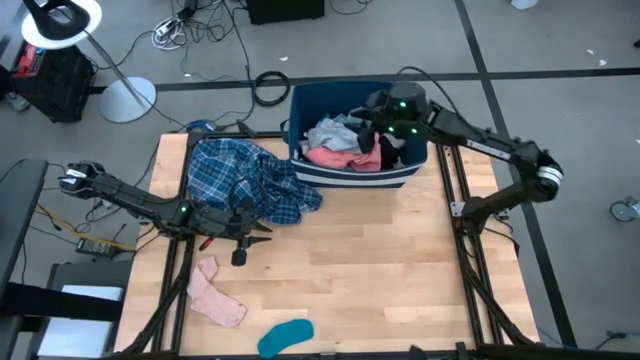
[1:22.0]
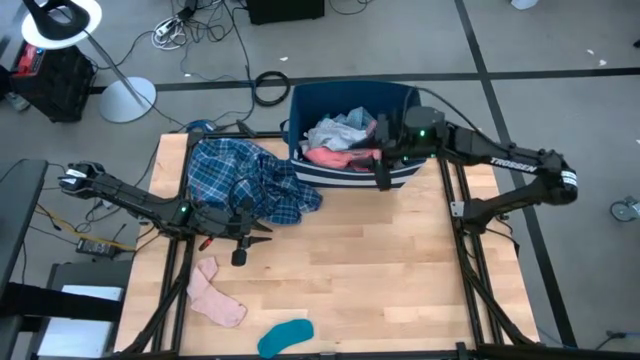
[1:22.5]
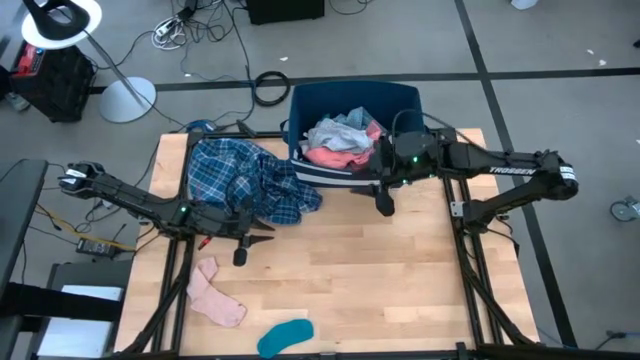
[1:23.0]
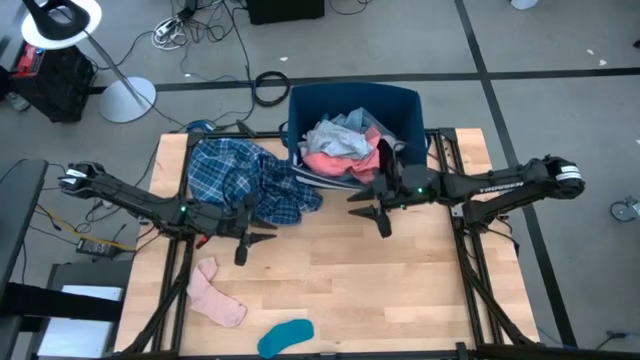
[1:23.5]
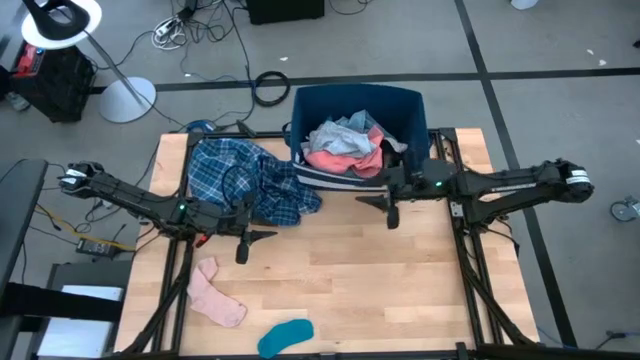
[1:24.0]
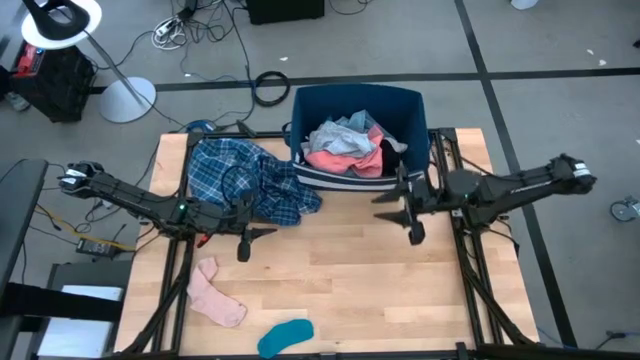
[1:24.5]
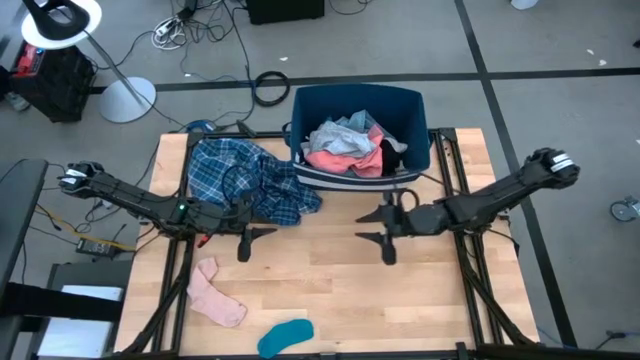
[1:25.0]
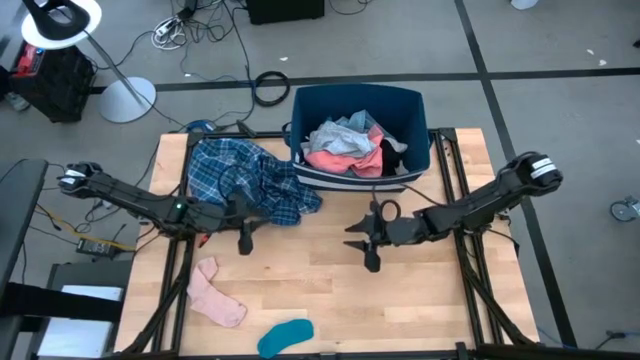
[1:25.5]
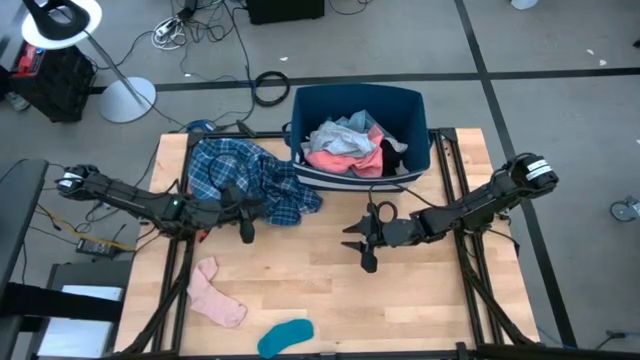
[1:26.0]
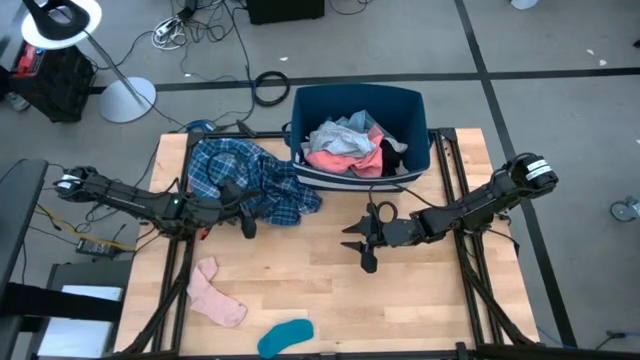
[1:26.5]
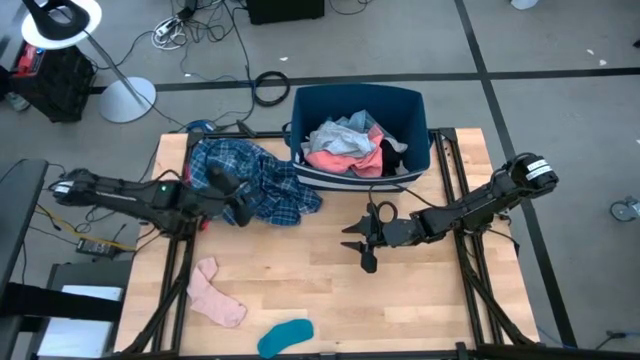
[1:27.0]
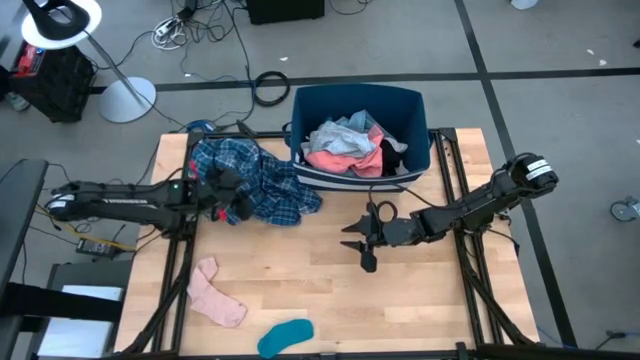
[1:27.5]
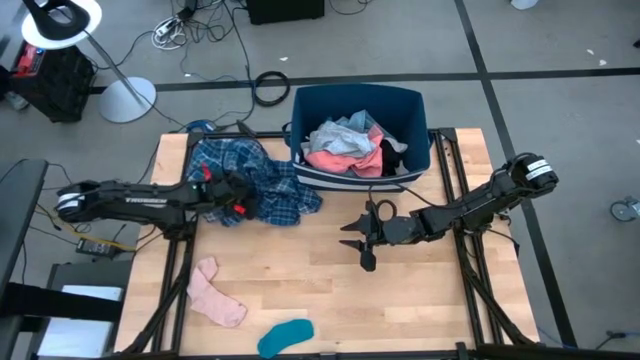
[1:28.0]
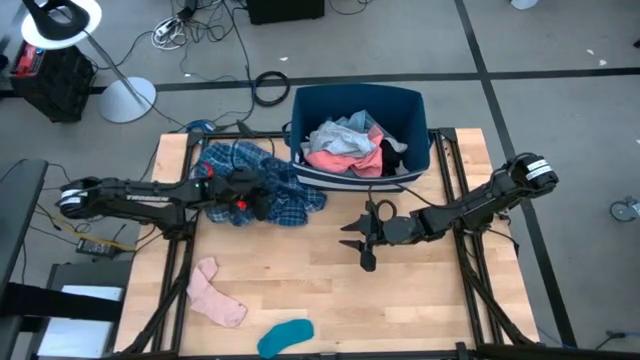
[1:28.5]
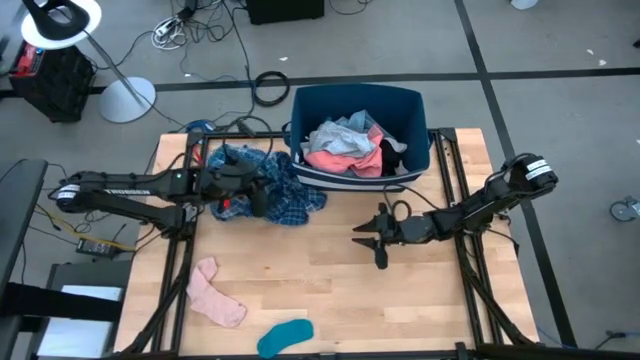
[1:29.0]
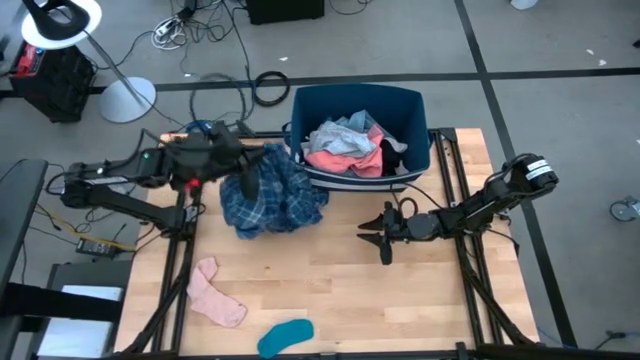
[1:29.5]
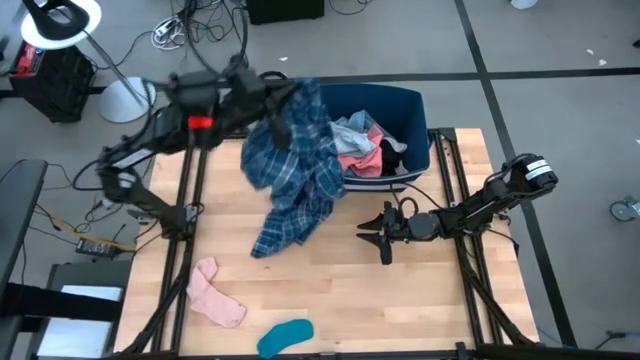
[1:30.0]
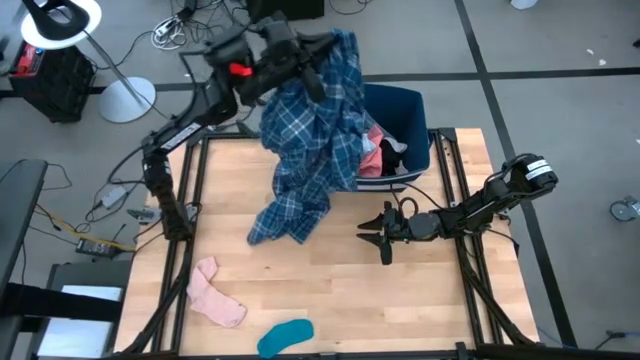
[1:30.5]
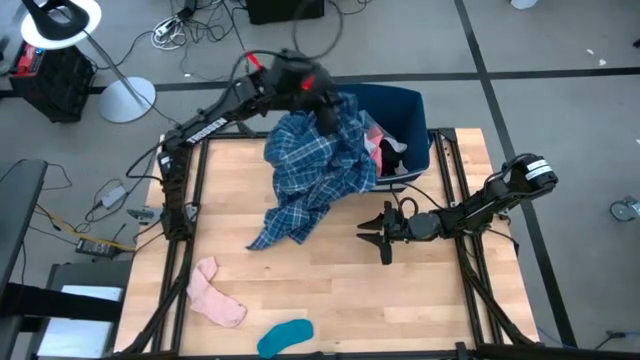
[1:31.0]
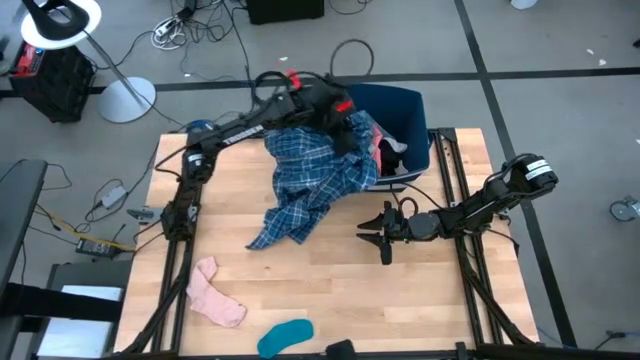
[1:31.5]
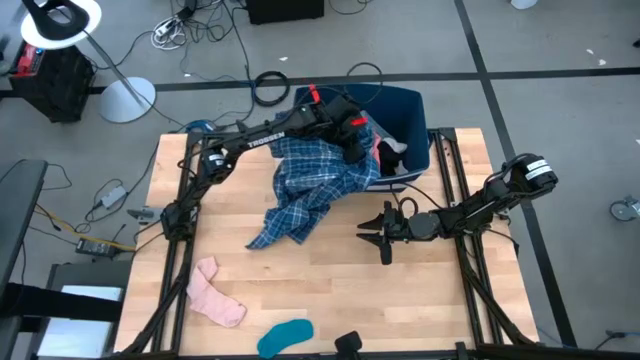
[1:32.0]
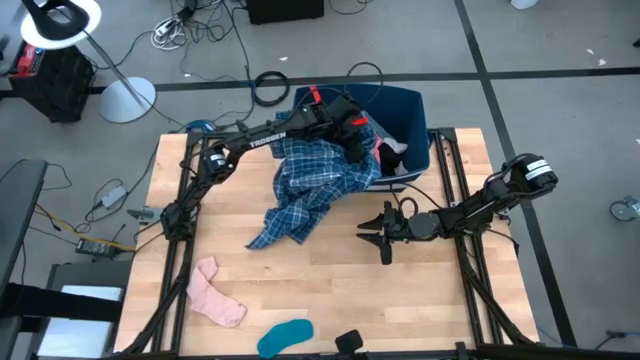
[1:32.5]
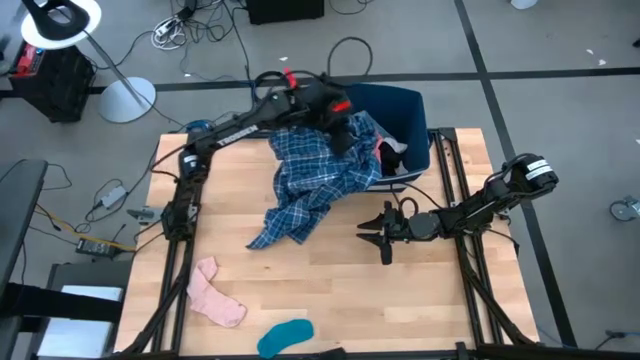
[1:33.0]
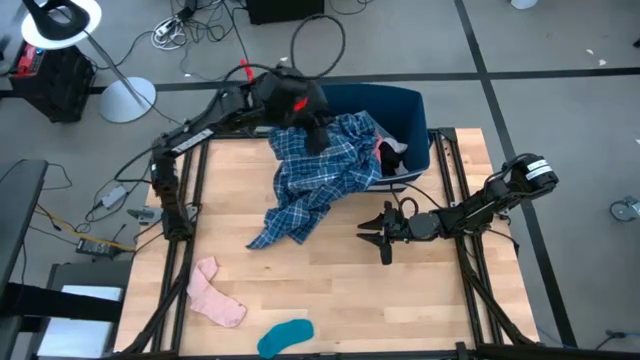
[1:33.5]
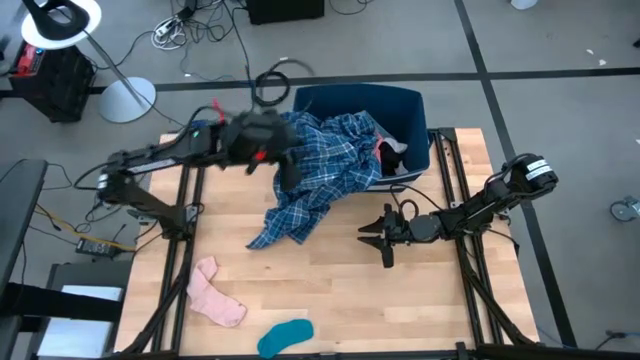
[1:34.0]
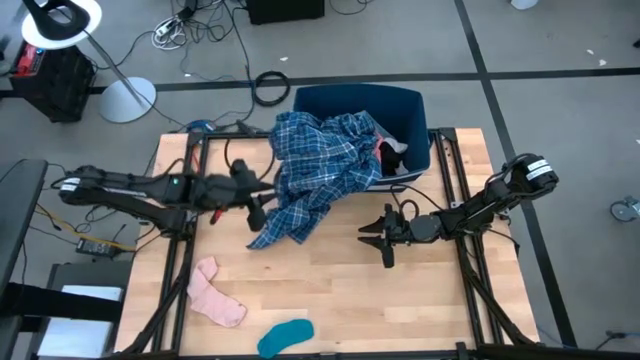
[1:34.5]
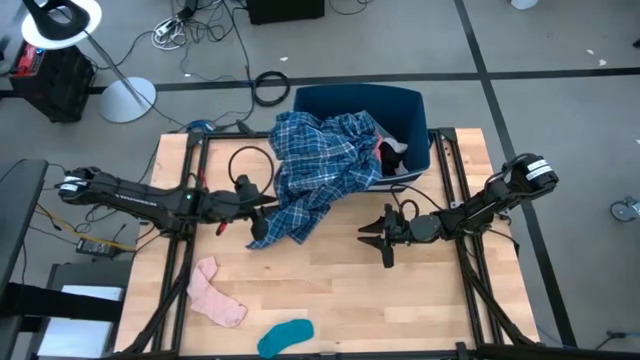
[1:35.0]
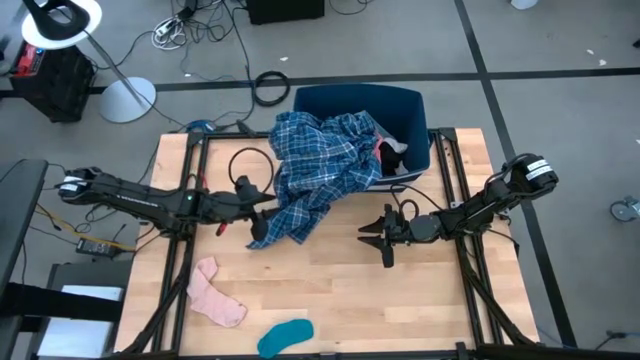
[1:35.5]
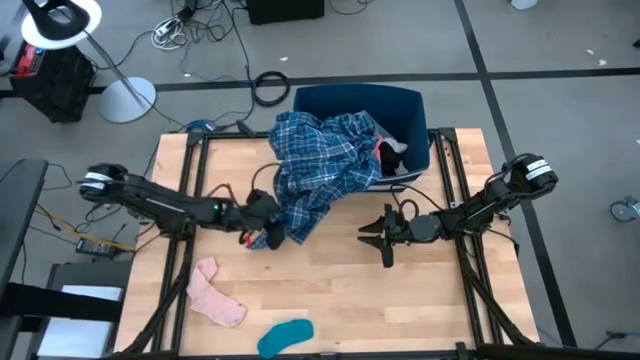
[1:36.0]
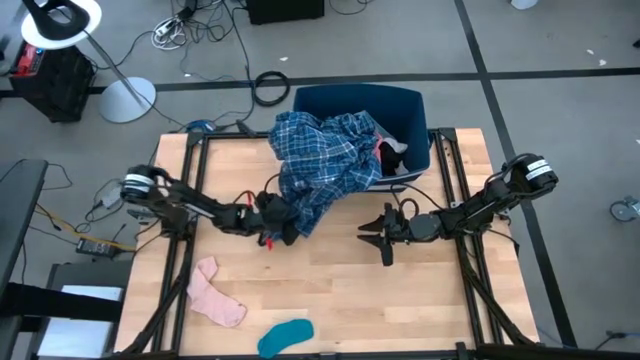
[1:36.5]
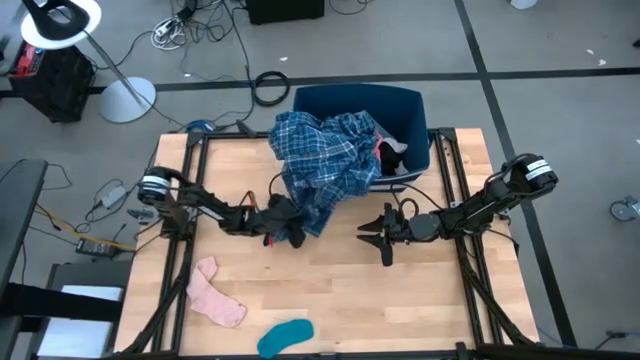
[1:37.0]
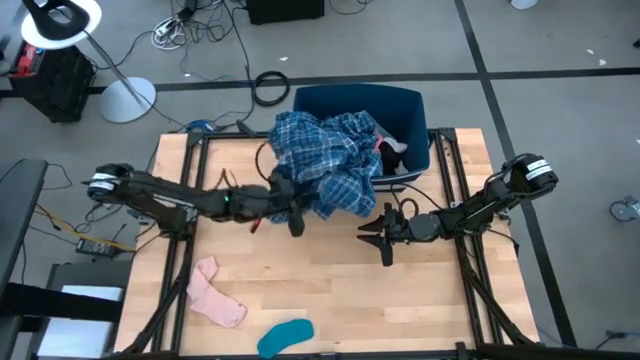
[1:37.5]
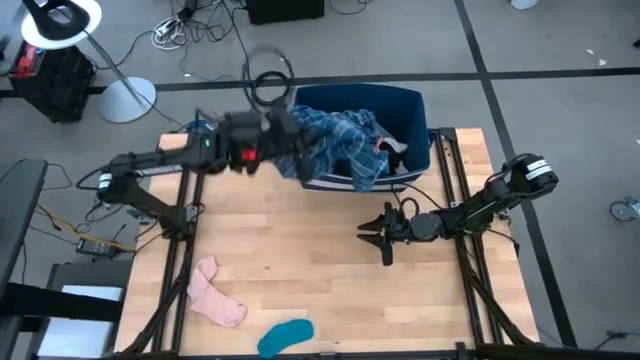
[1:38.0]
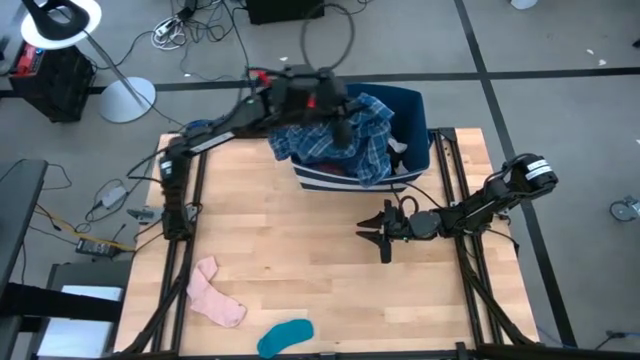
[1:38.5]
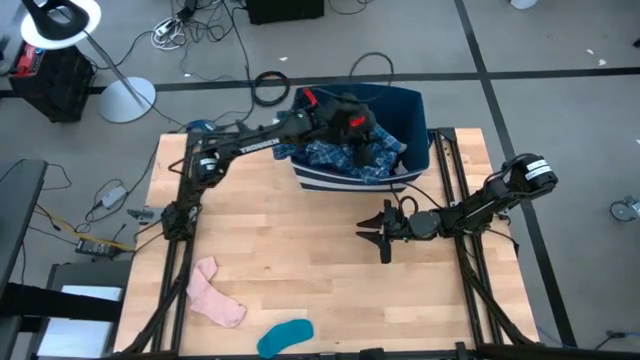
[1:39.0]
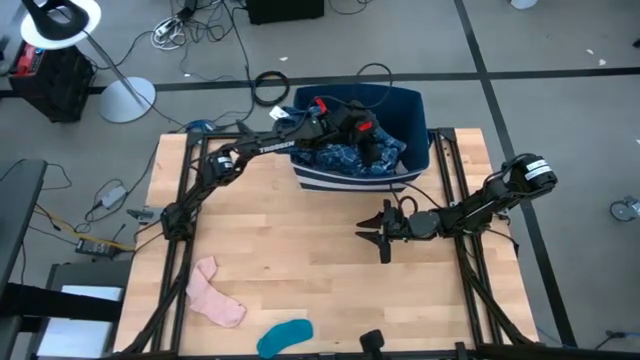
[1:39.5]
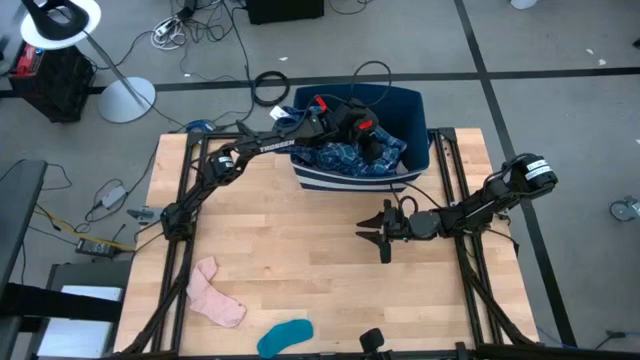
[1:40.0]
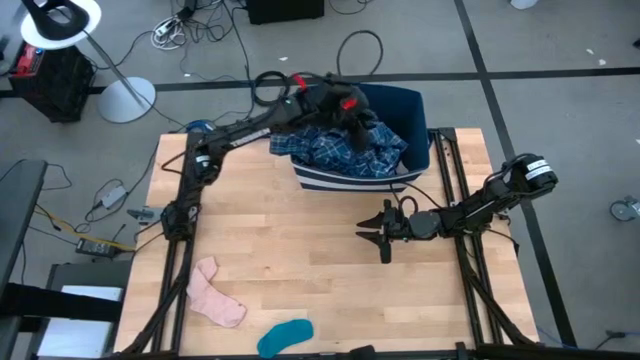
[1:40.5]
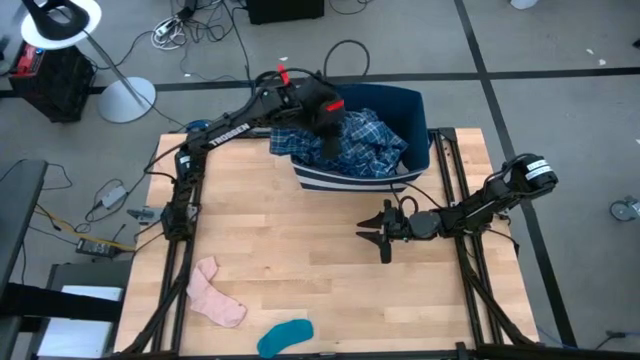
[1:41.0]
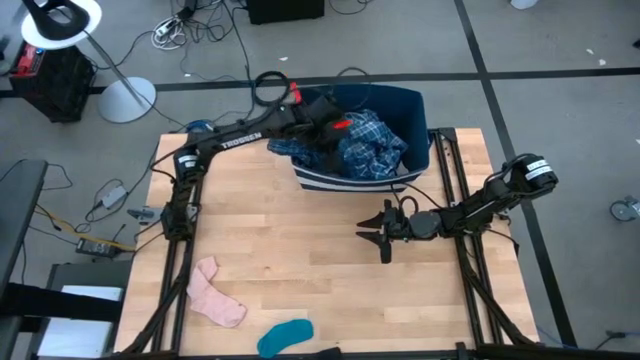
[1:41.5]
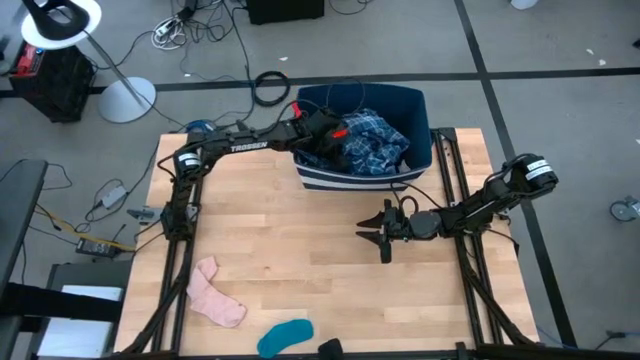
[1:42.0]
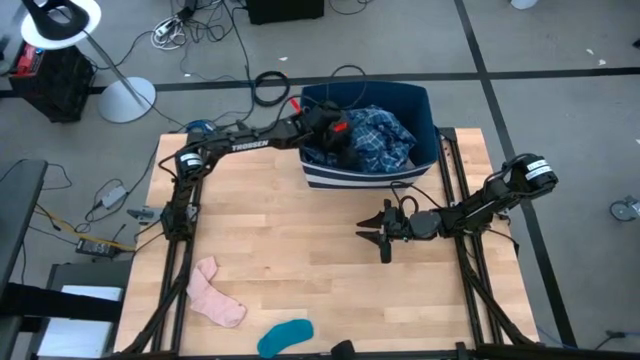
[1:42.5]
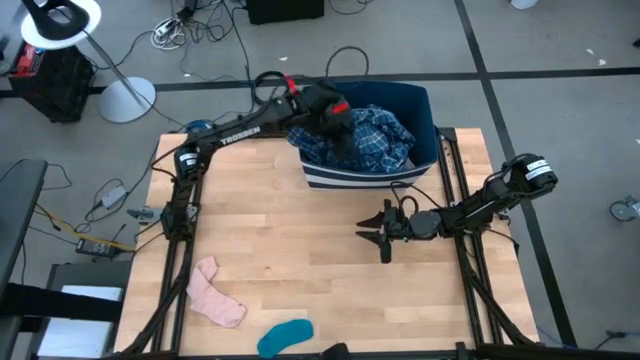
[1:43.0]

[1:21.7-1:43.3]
Task: Sort clothes
Put the blue and white shirt into the blue bin
